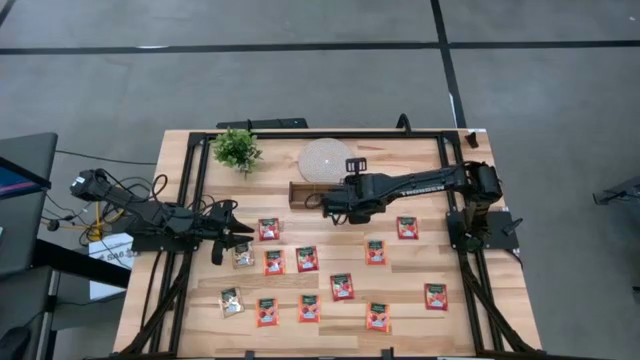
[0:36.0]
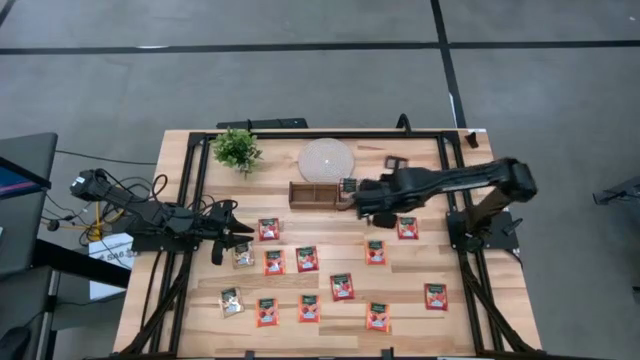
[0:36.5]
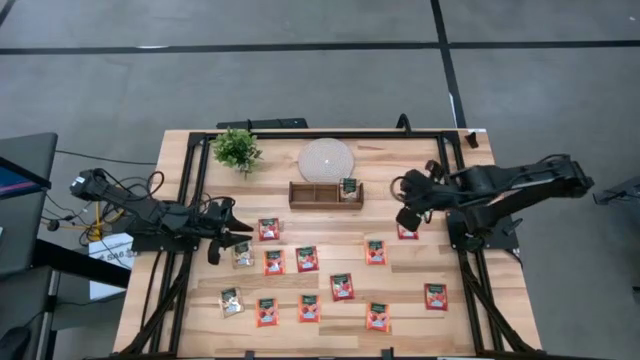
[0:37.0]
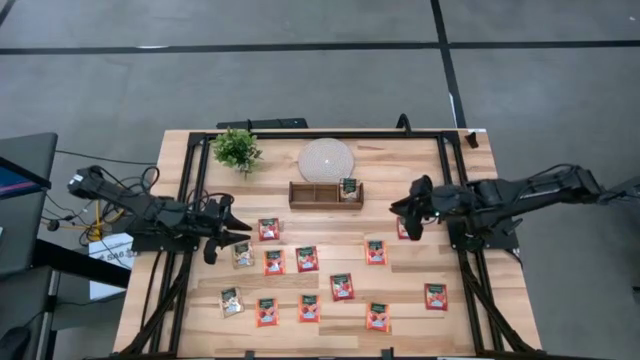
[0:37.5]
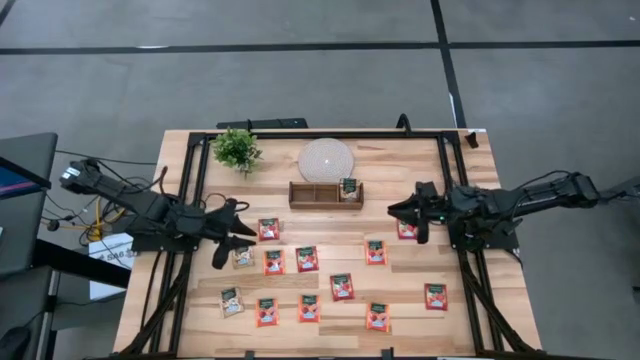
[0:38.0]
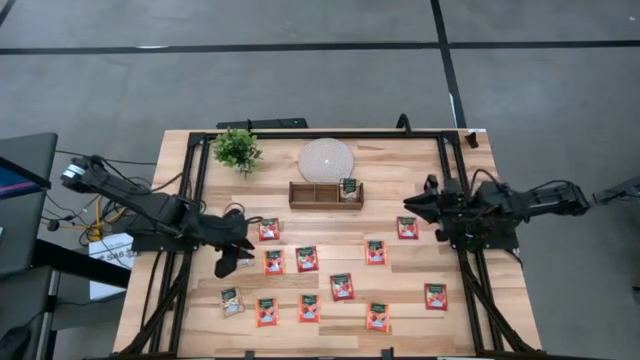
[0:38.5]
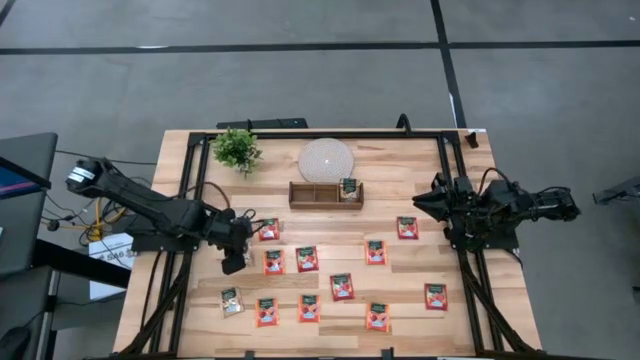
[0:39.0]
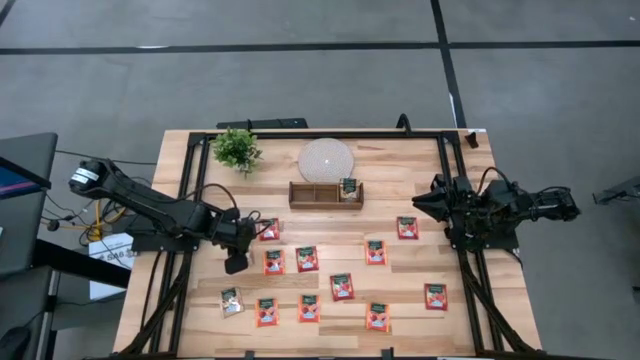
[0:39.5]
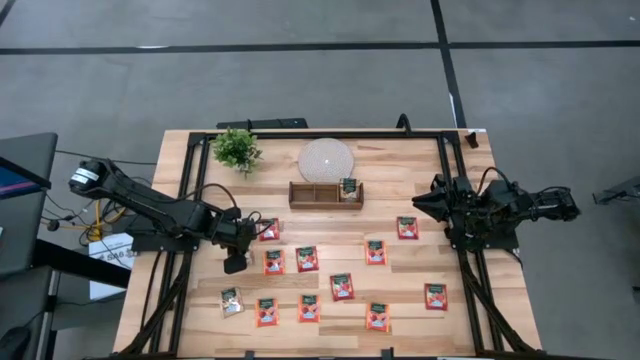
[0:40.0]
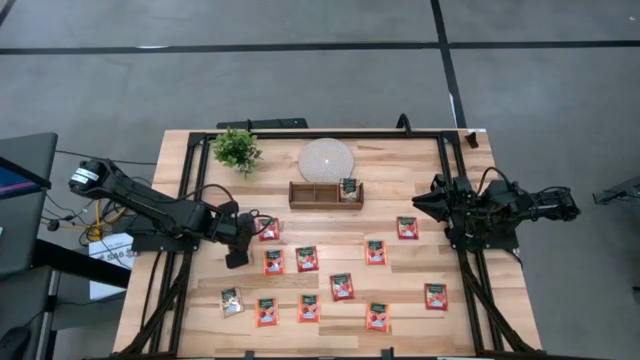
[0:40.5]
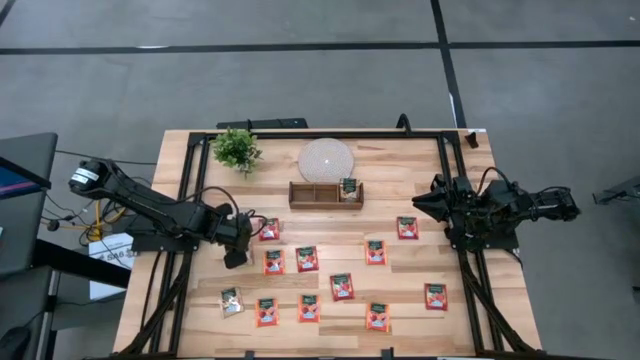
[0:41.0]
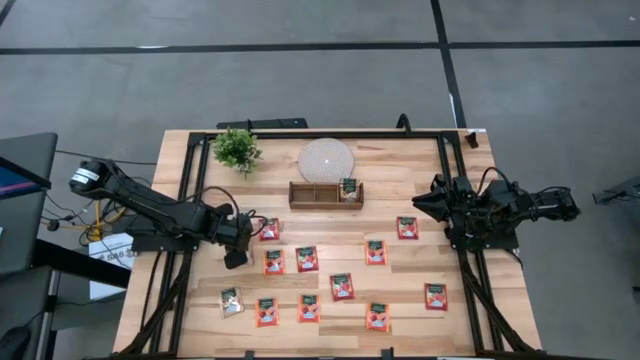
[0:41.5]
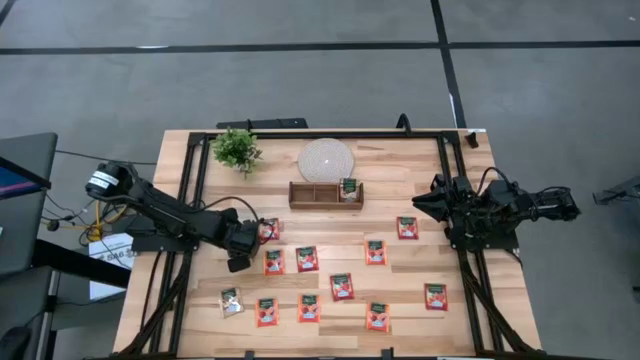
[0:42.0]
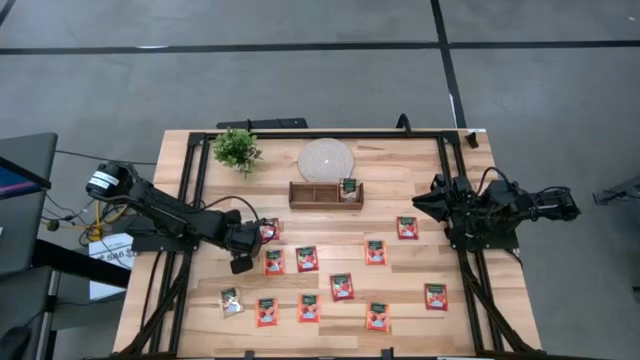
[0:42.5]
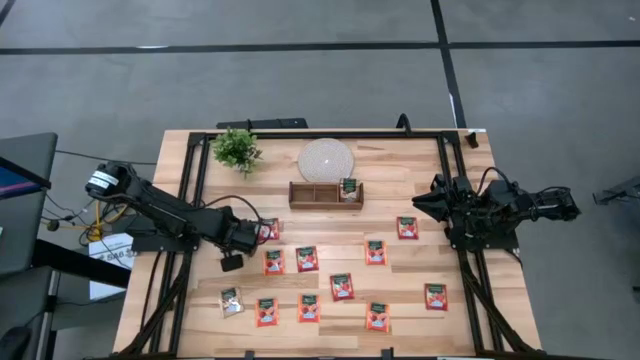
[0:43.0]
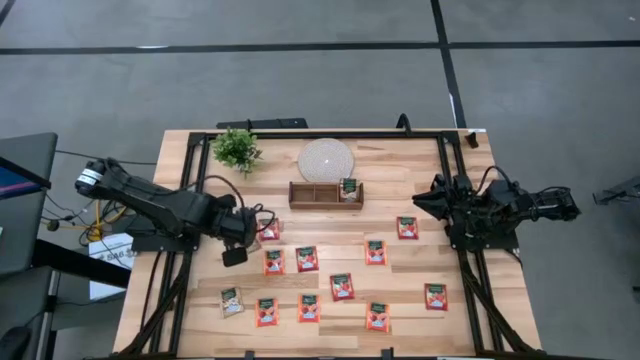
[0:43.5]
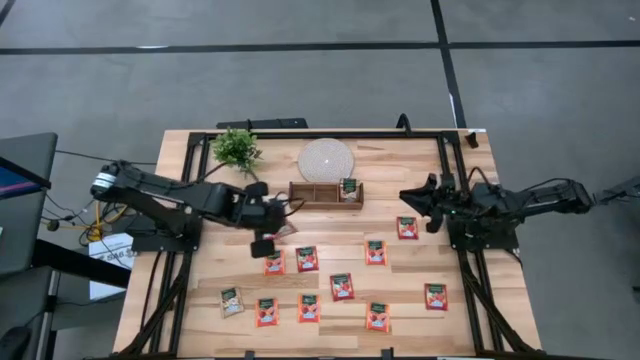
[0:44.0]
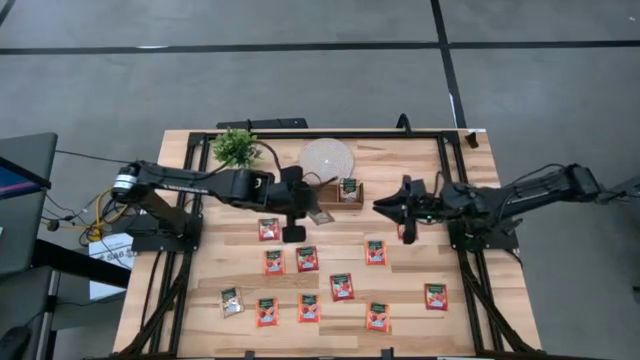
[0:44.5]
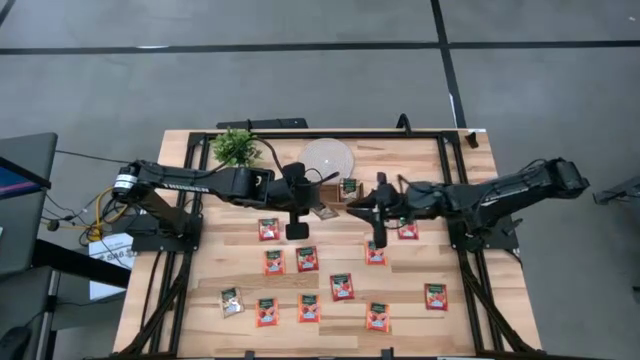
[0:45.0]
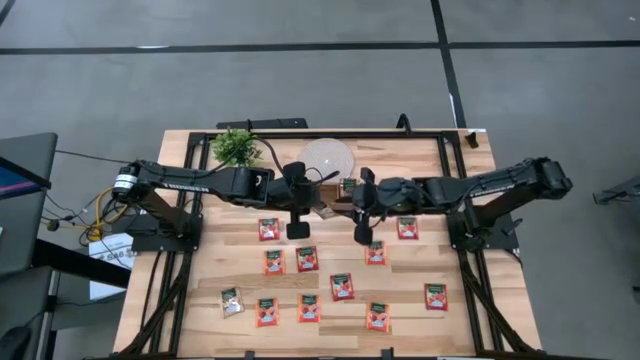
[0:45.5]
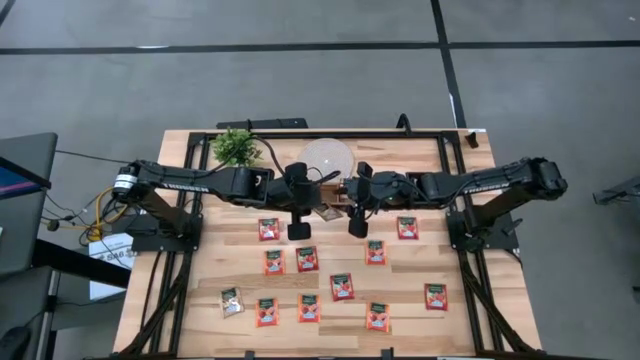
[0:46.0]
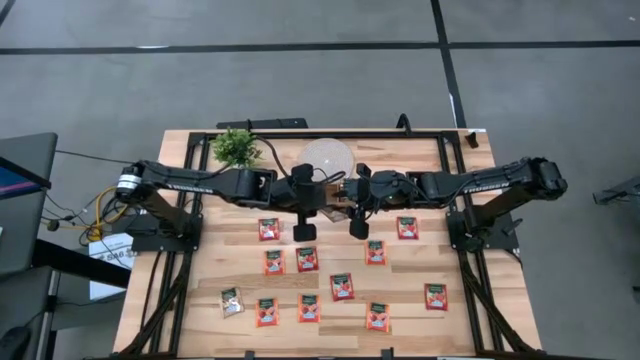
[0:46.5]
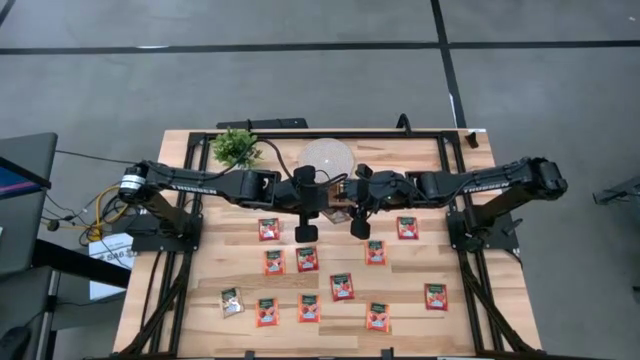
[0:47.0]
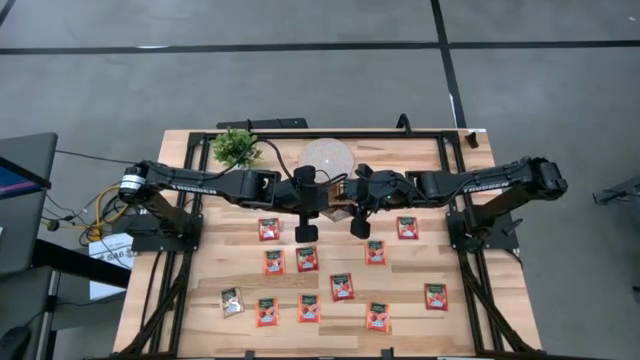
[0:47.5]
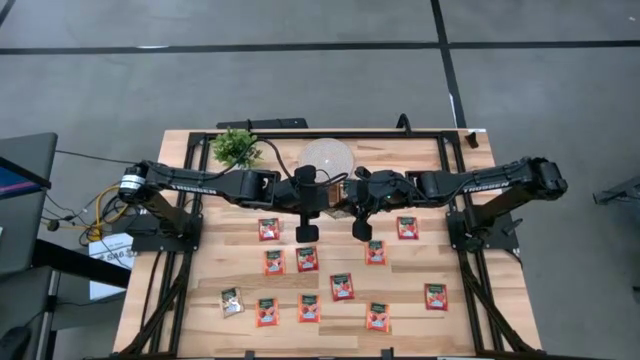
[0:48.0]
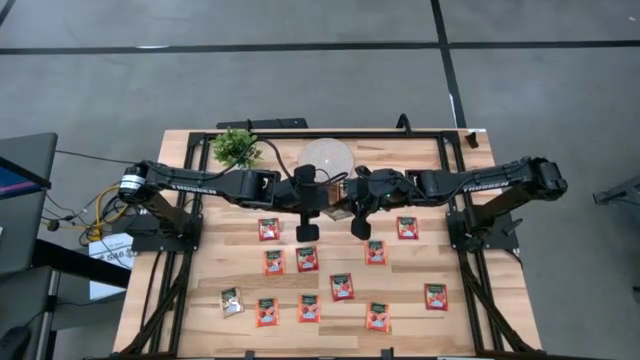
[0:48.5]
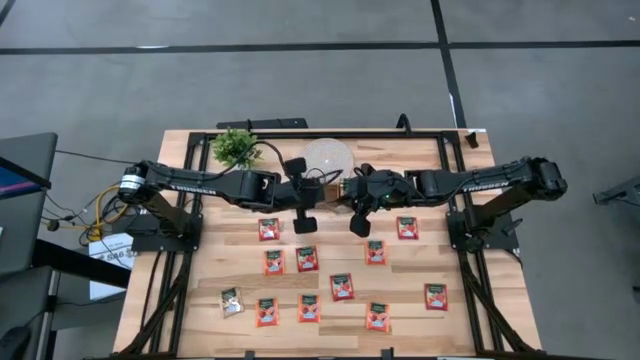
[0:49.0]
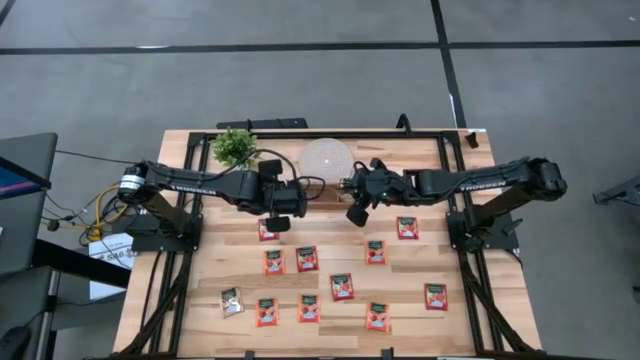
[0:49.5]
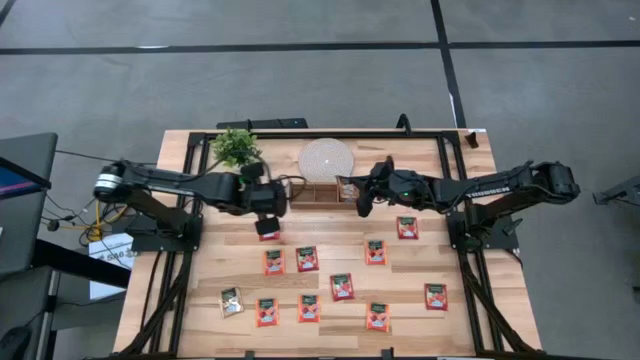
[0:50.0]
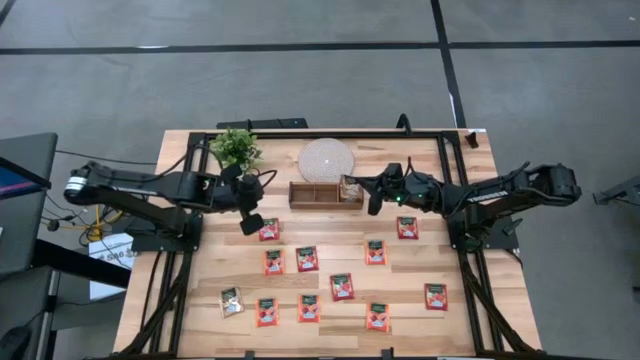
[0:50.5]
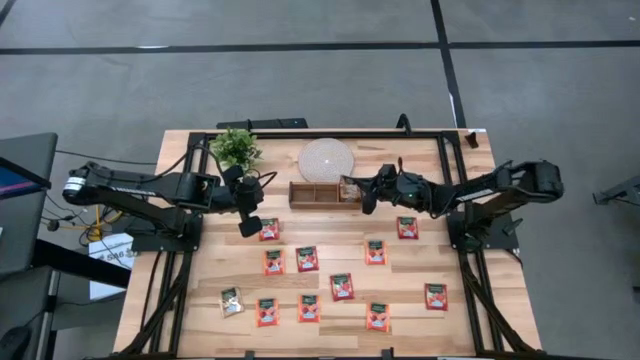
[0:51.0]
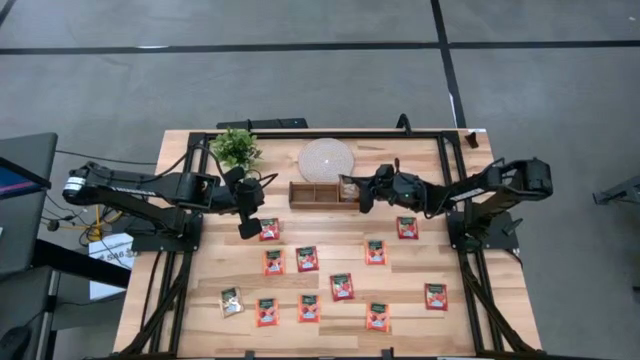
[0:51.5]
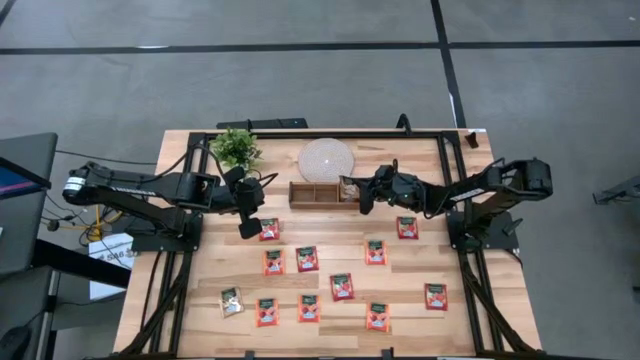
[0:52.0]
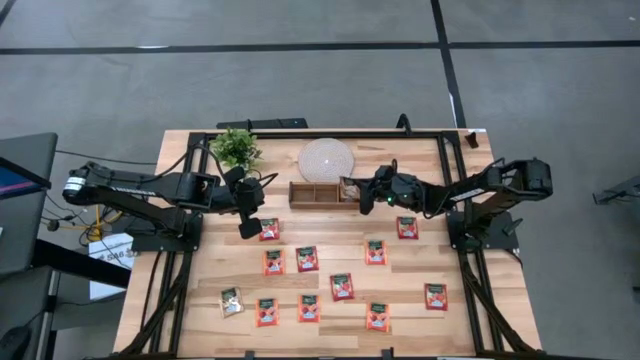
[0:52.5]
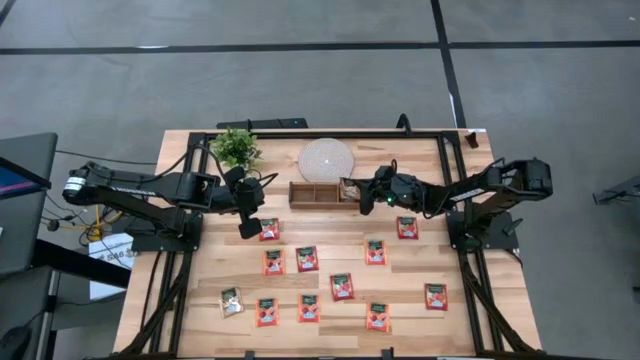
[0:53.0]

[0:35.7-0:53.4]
Task: Pick & Place Tea
Put the brown tea bag into the right section of the wooden organizer

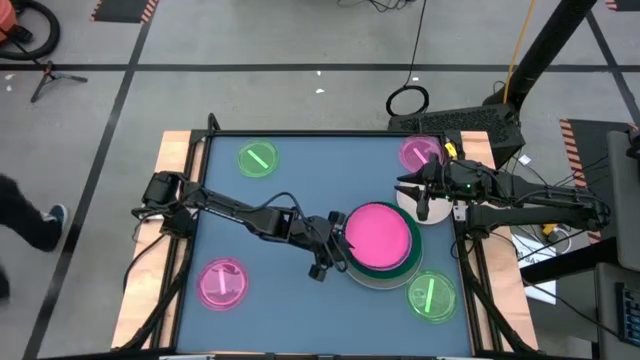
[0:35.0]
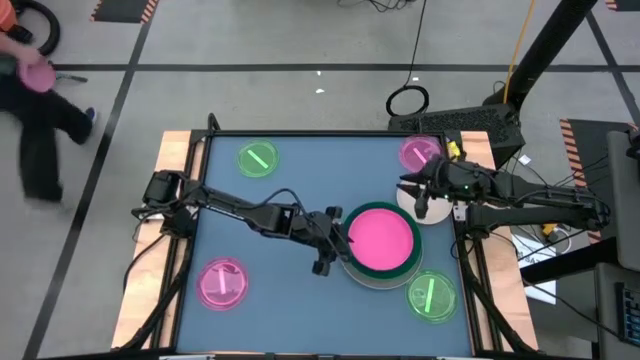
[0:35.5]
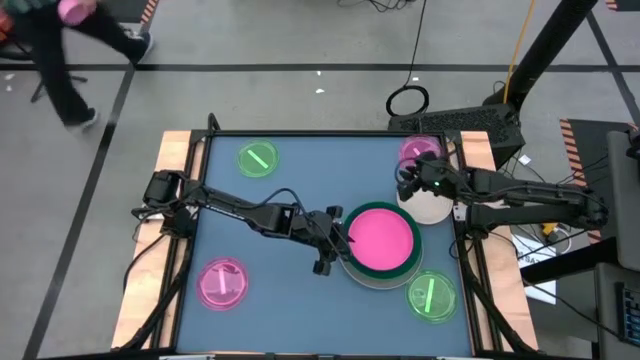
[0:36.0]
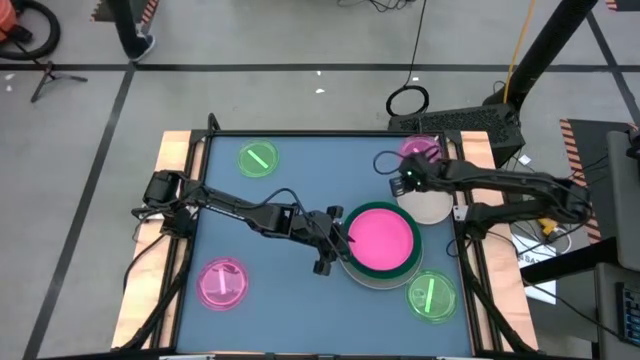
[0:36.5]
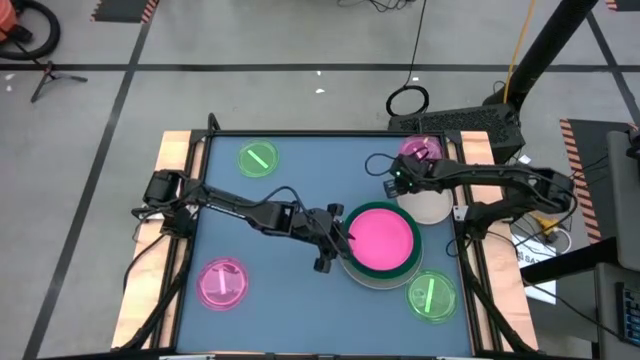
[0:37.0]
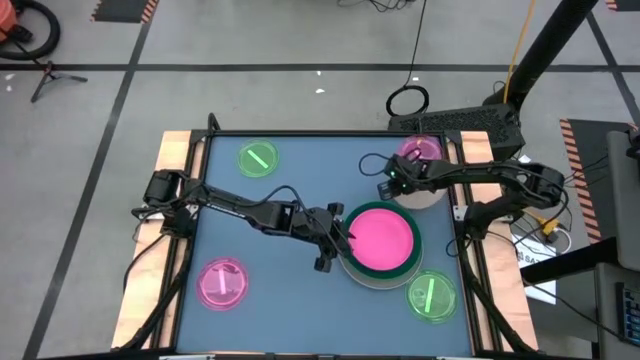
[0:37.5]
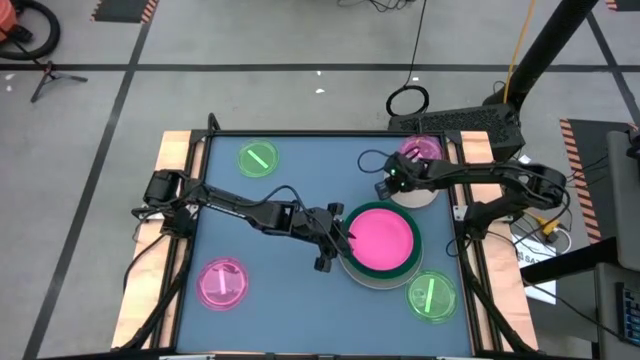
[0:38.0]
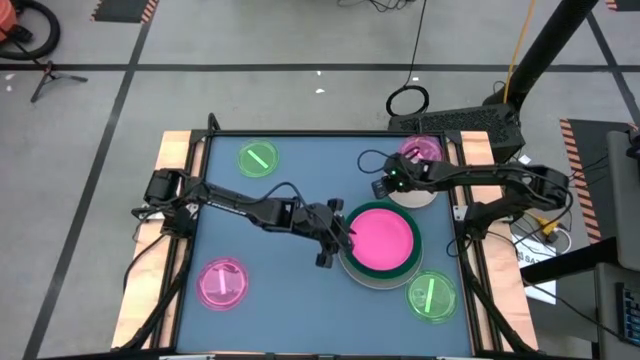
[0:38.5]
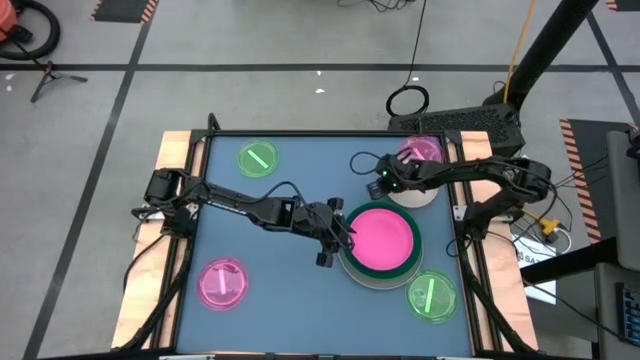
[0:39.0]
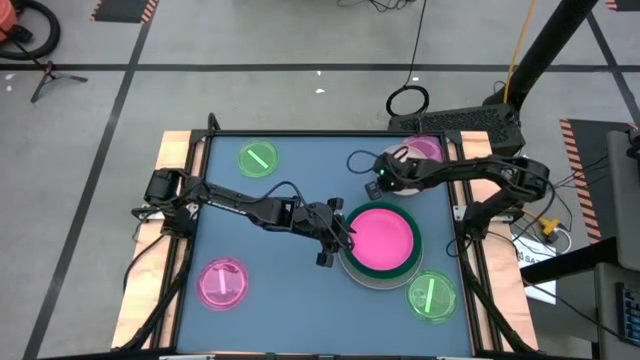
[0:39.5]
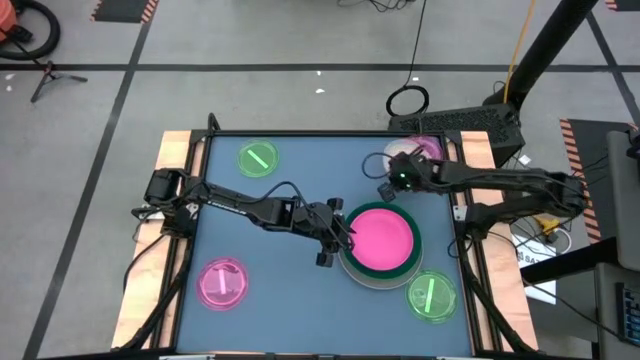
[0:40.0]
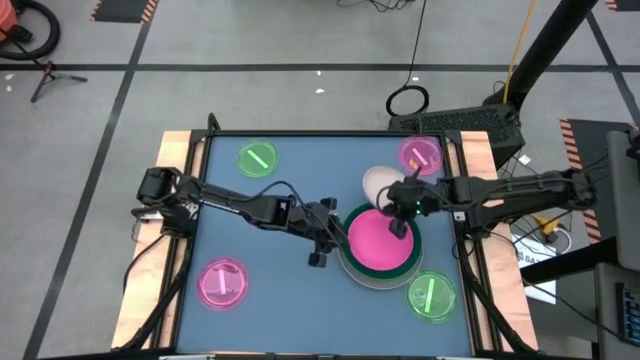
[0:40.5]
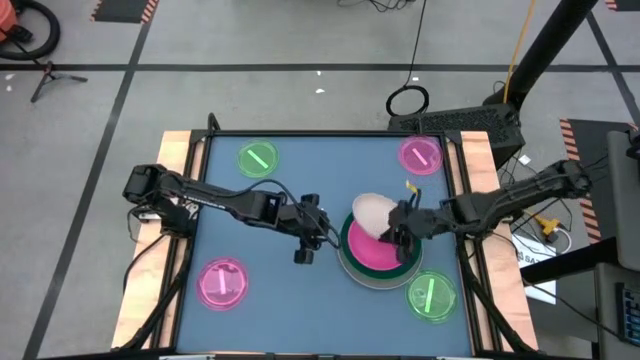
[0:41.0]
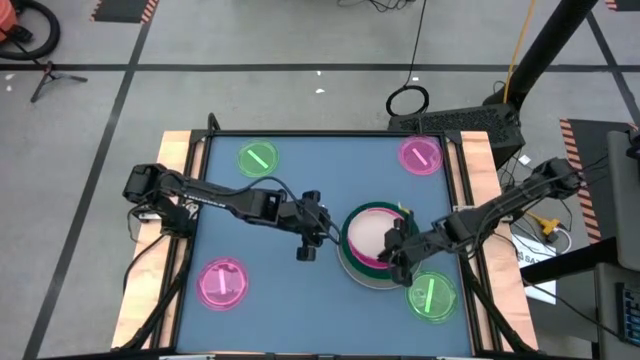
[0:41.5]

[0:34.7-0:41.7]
Task: Stack plastic plates
Stack the white plate on top of the pink plate
